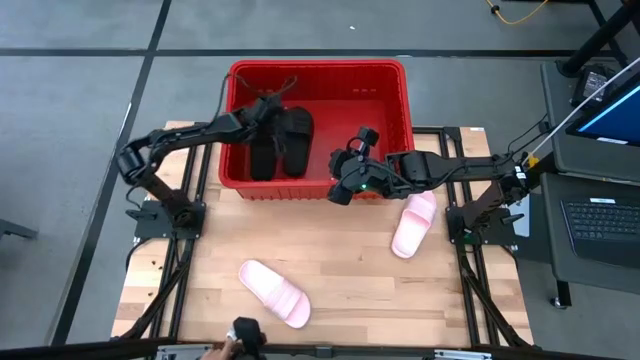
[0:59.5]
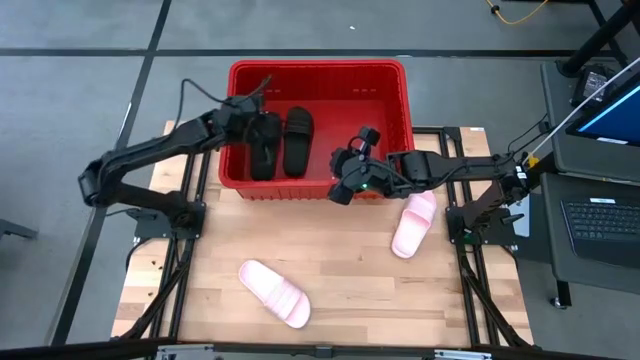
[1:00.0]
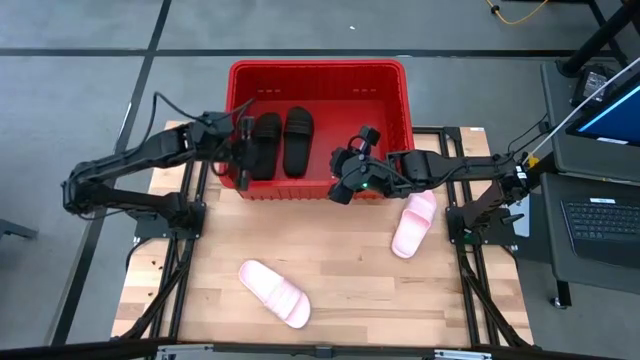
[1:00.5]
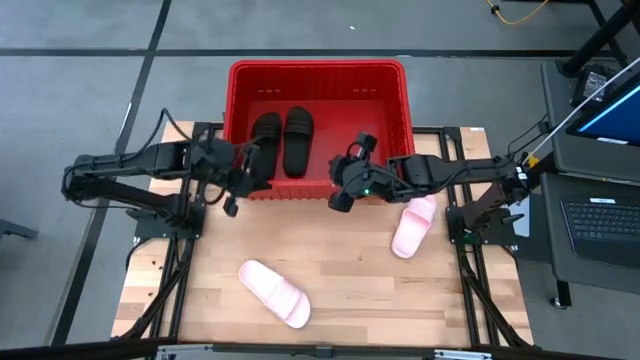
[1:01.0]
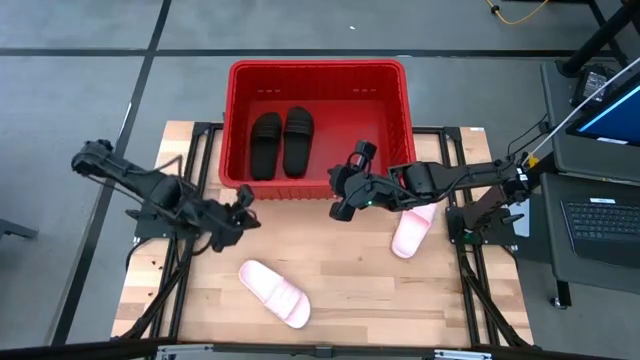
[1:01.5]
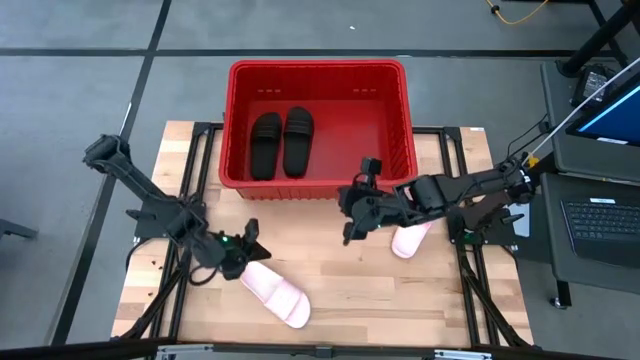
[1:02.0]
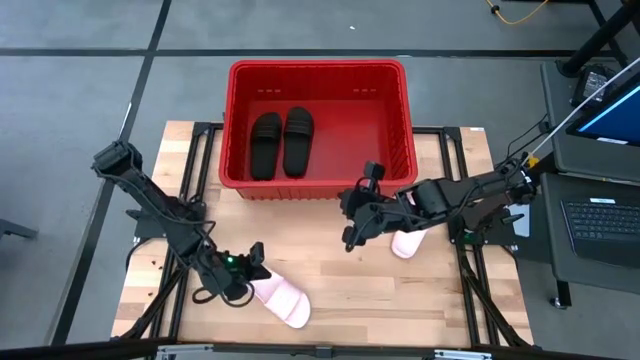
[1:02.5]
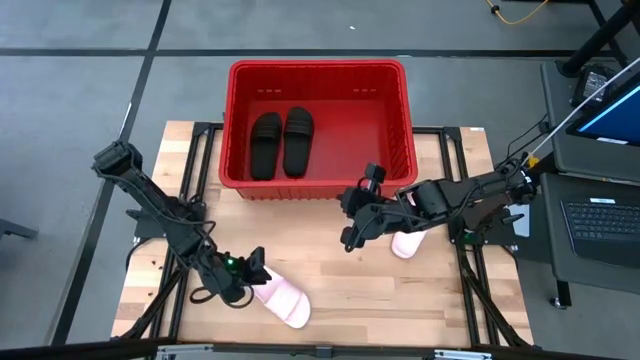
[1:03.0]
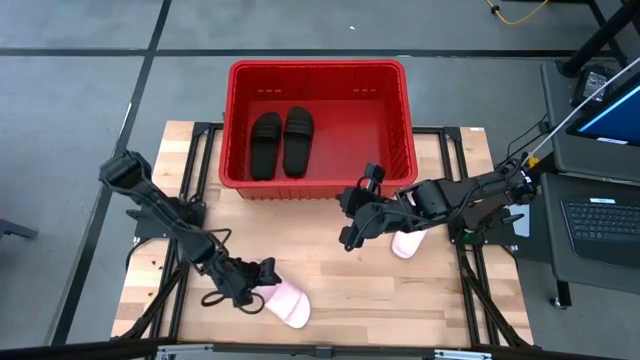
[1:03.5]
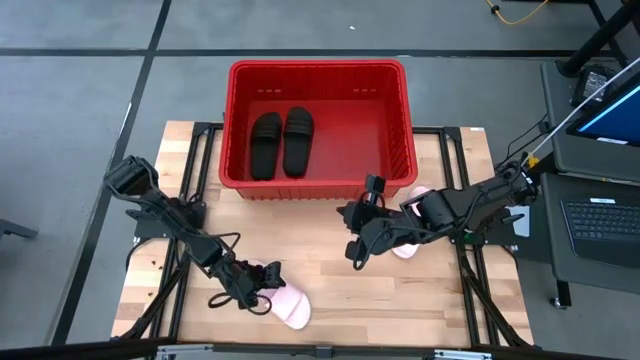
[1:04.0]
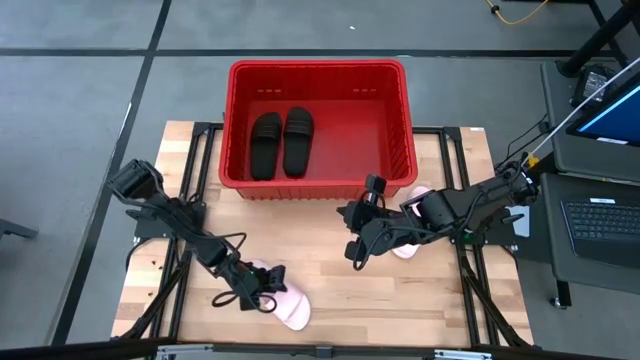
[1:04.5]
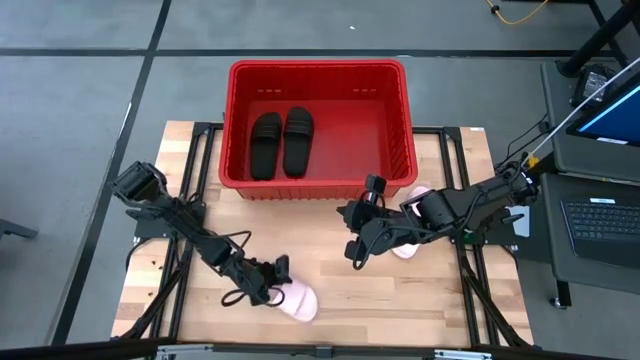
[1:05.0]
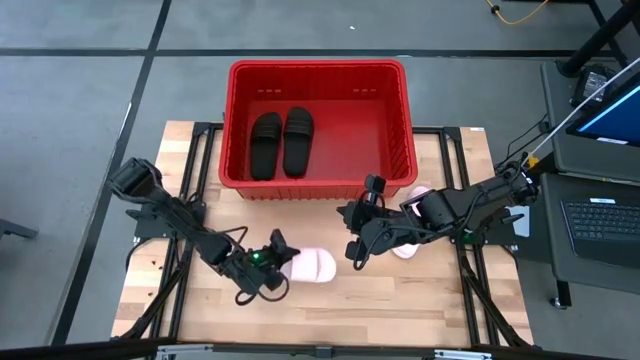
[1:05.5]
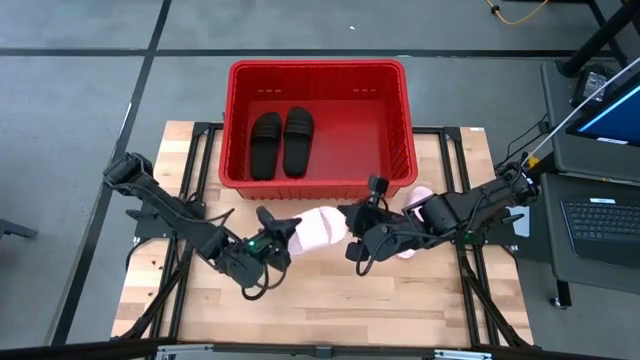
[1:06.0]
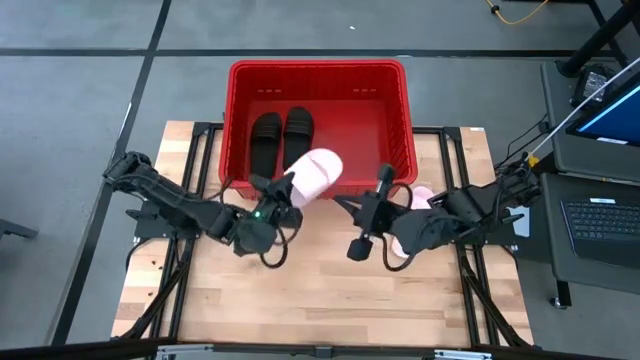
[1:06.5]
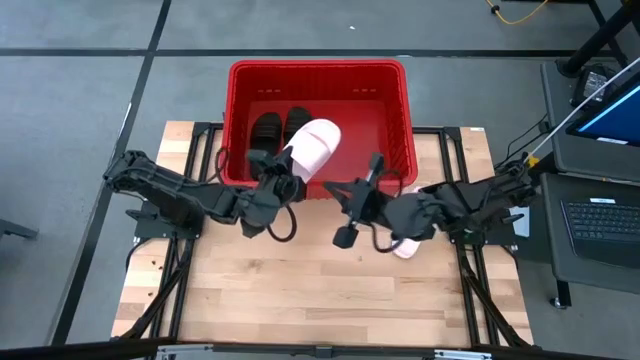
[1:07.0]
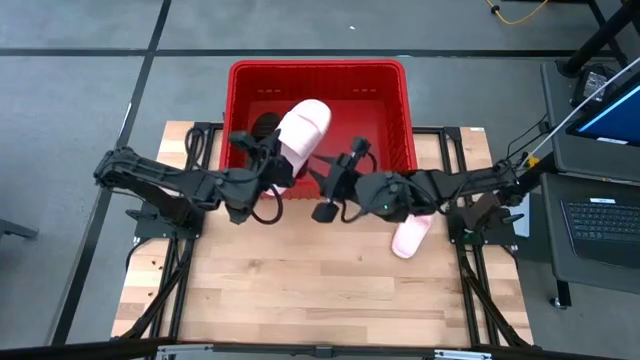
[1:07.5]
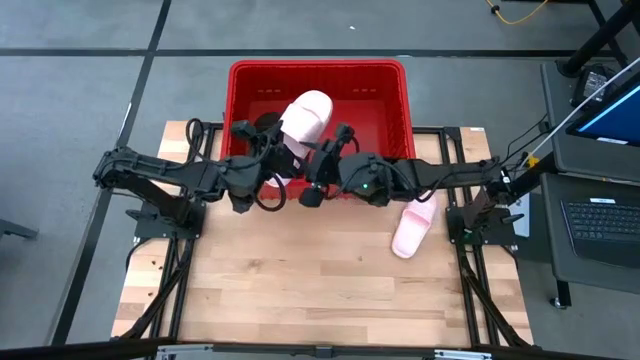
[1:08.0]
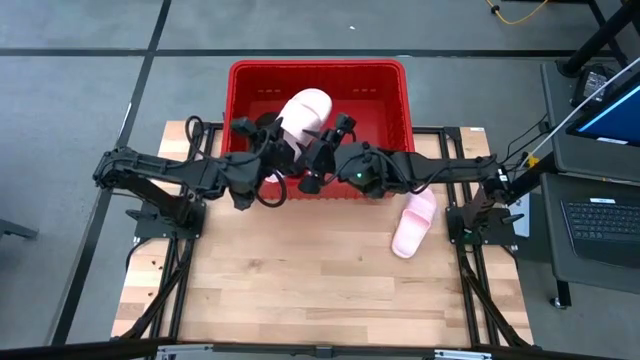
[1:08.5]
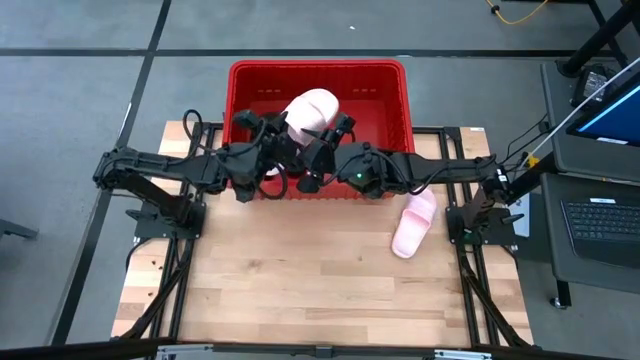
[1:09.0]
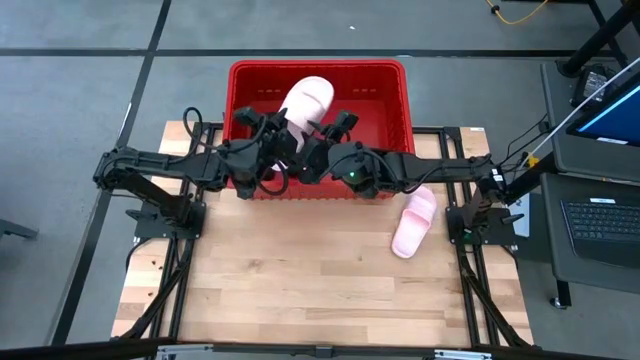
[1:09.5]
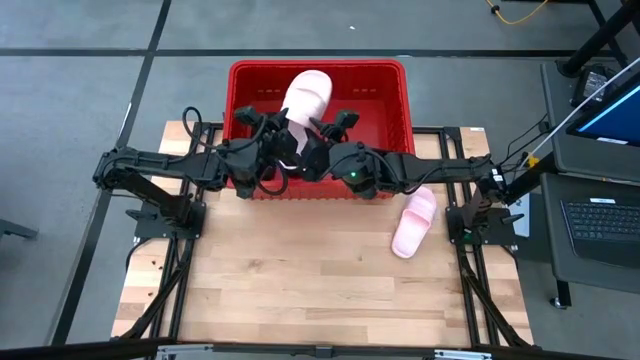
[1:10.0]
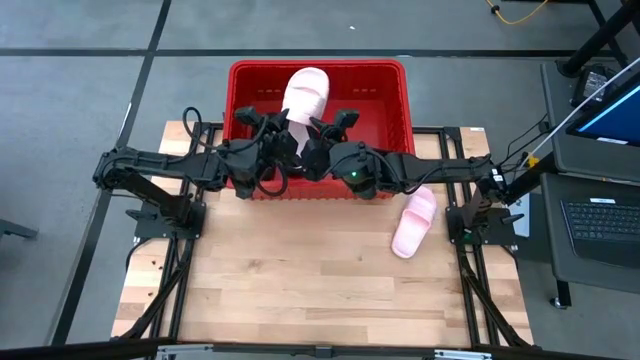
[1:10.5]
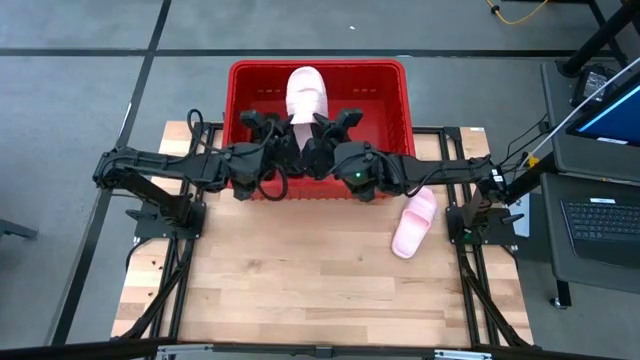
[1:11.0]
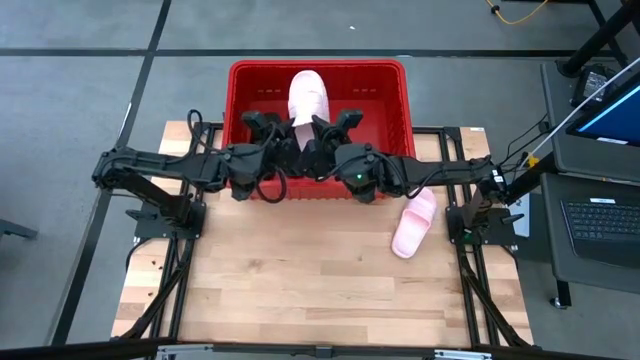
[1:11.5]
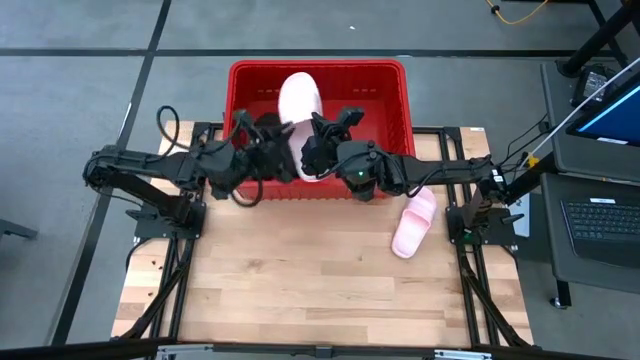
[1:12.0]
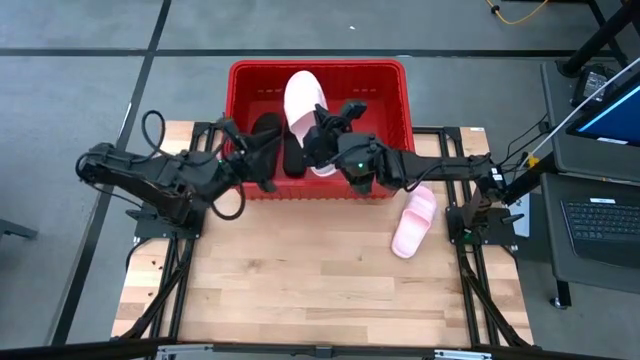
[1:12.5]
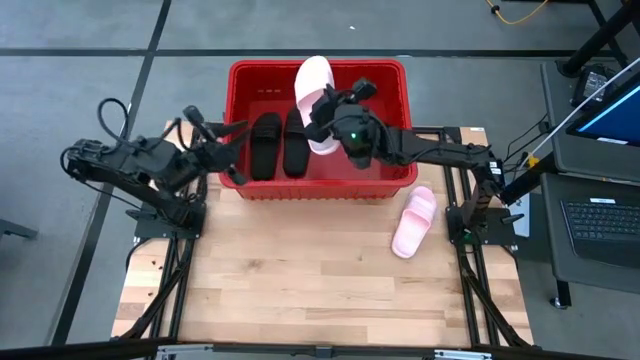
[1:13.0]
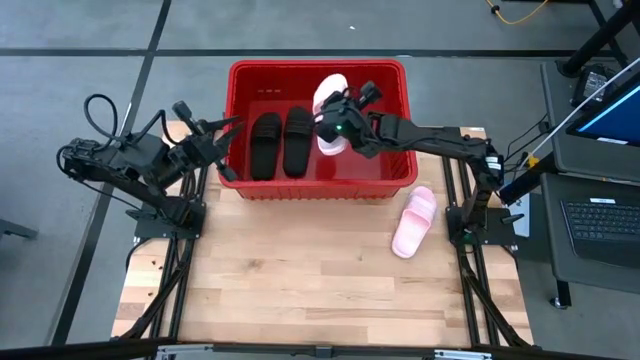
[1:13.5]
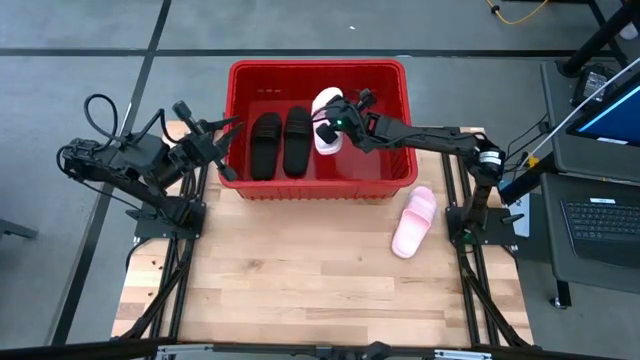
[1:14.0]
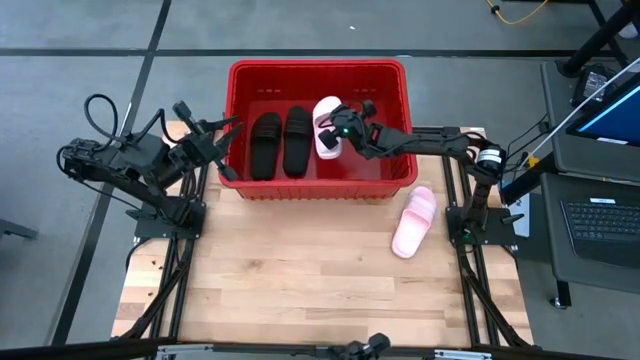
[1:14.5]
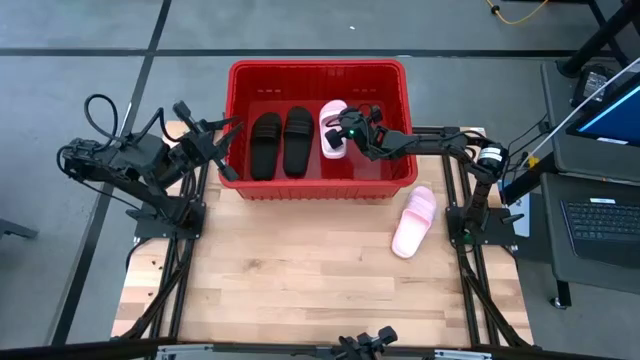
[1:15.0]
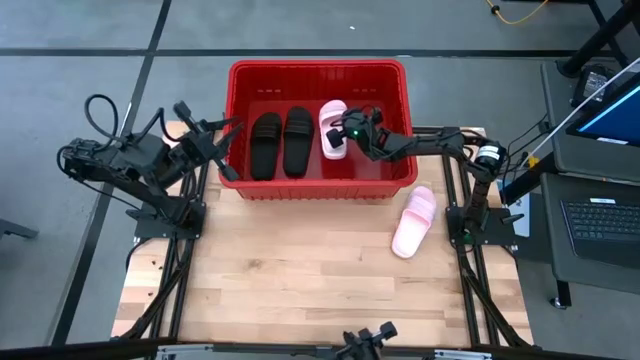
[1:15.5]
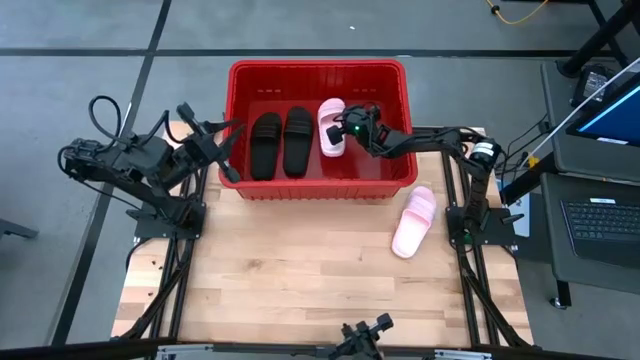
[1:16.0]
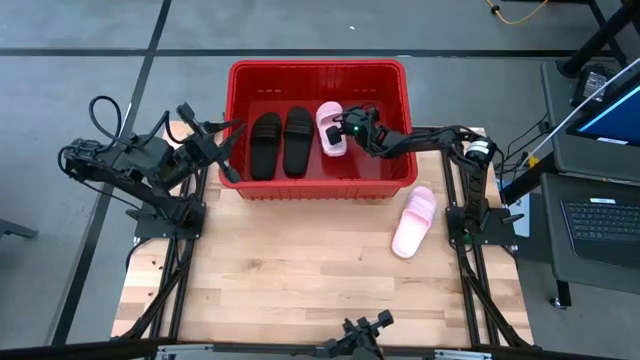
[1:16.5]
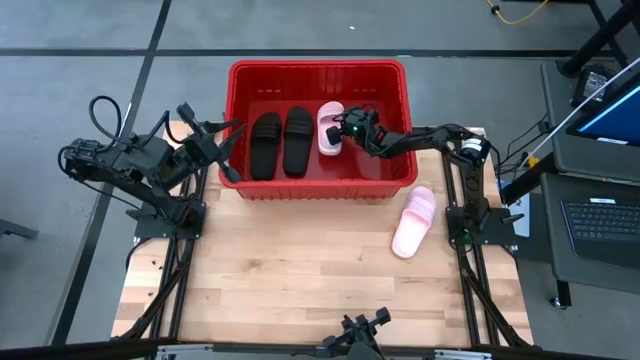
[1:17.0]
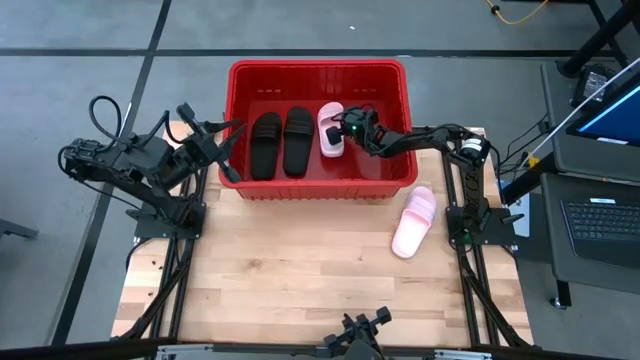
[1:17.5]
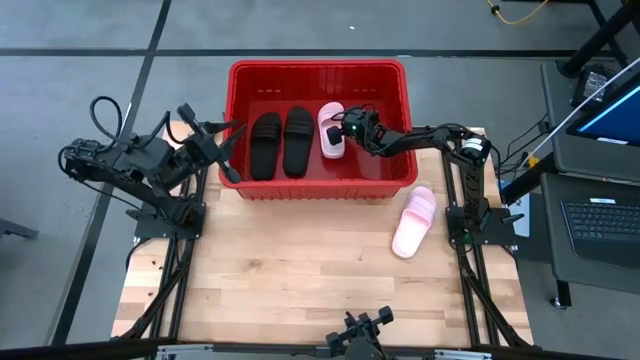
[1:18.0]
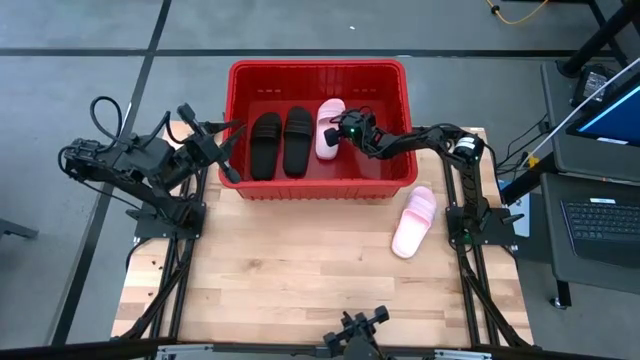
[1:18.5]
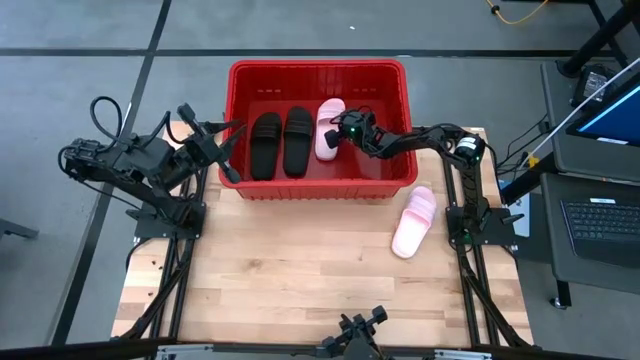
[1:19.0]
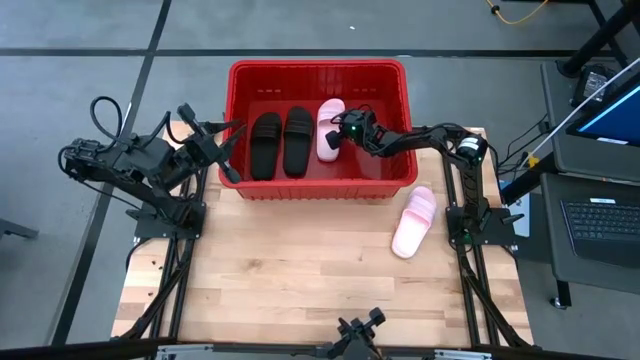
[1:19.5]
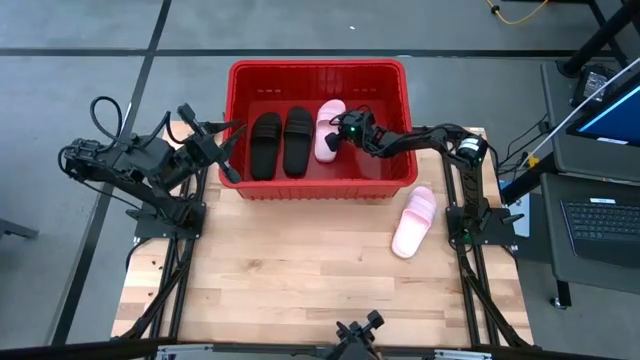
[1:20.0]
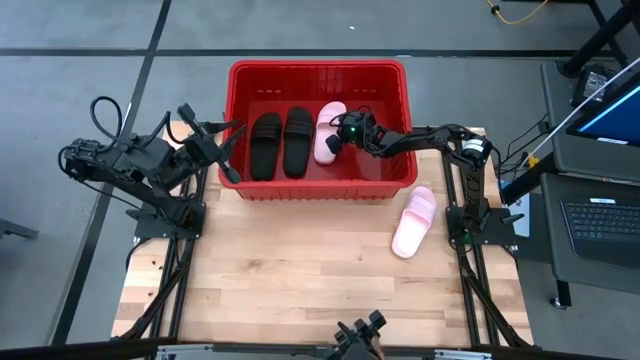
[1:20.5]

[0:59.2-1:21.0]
Task: Pick and place slides into bin
Put the left pink slide into the red container
